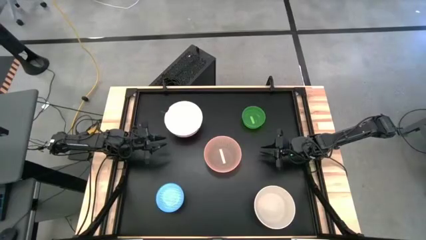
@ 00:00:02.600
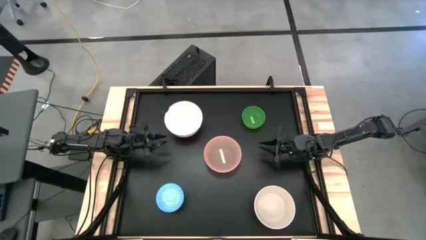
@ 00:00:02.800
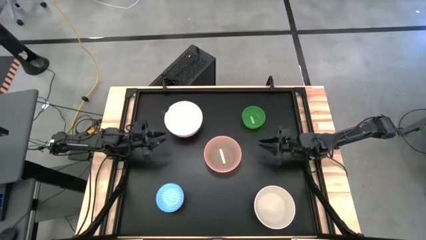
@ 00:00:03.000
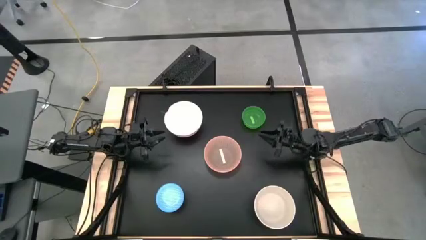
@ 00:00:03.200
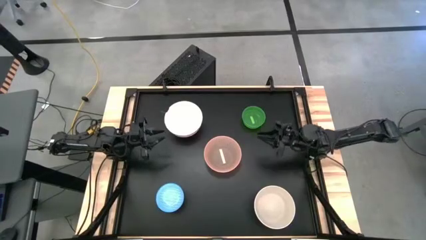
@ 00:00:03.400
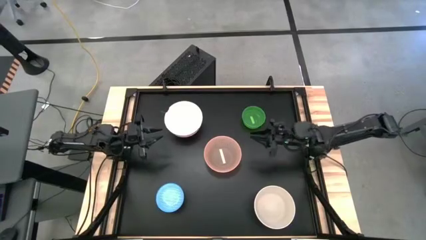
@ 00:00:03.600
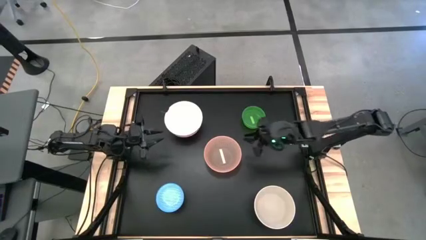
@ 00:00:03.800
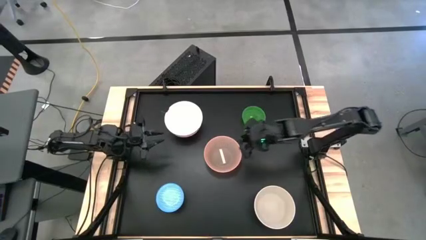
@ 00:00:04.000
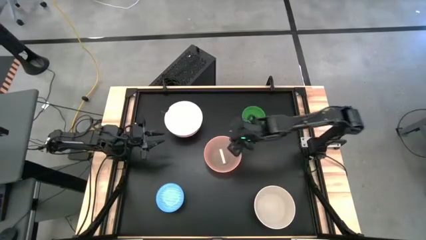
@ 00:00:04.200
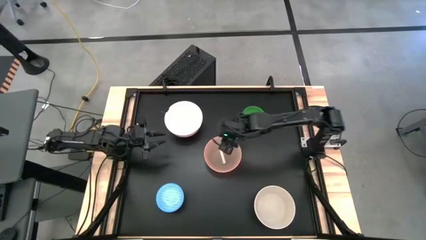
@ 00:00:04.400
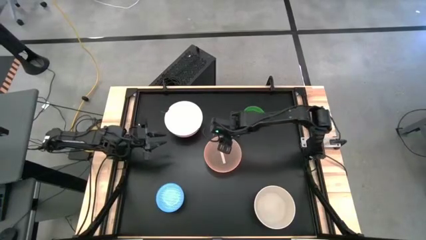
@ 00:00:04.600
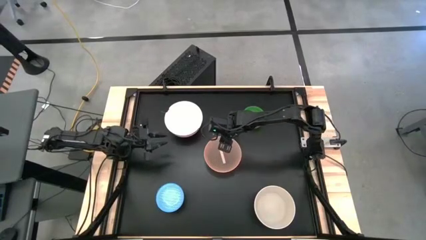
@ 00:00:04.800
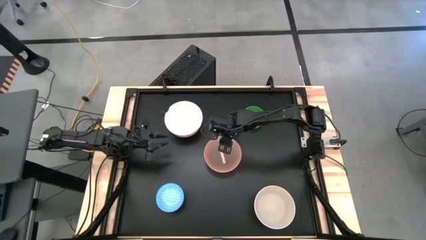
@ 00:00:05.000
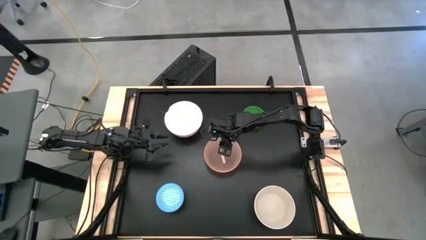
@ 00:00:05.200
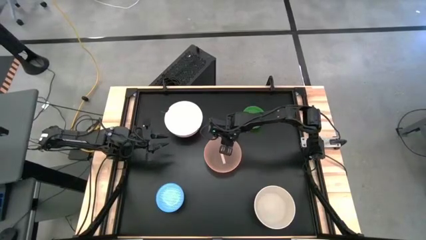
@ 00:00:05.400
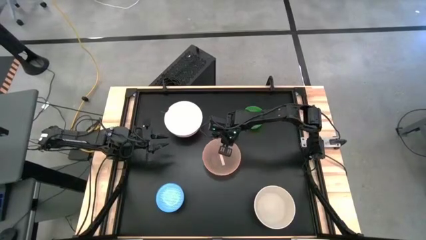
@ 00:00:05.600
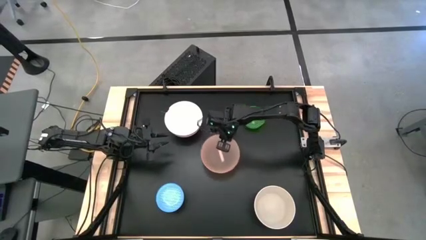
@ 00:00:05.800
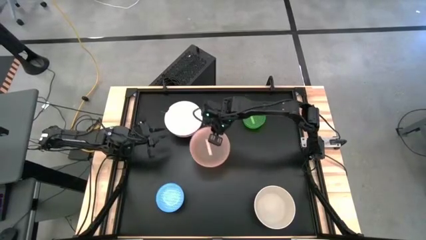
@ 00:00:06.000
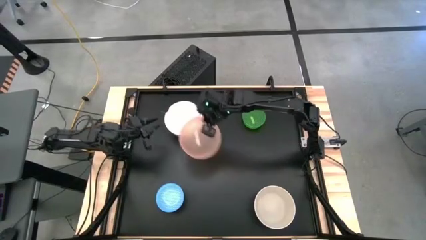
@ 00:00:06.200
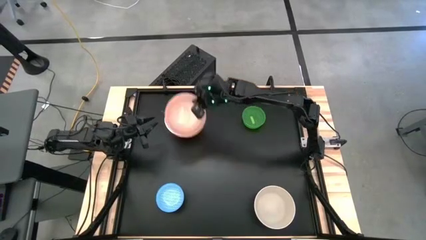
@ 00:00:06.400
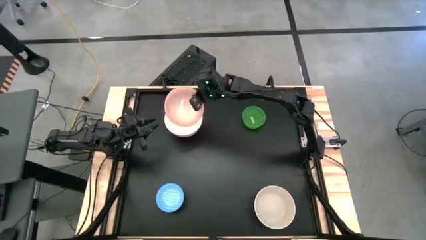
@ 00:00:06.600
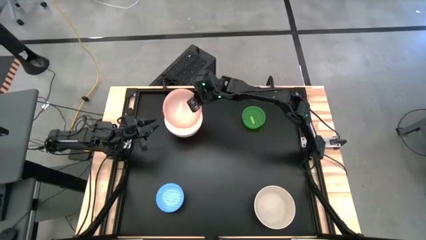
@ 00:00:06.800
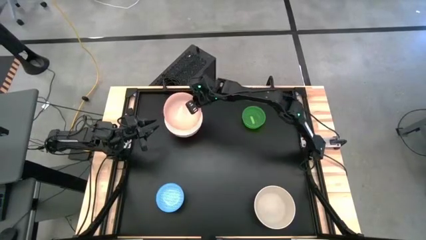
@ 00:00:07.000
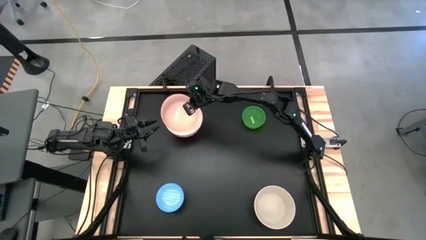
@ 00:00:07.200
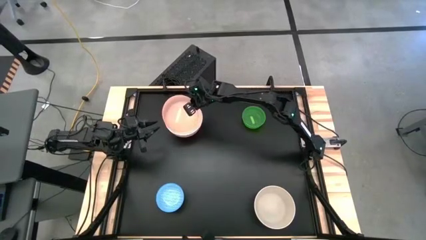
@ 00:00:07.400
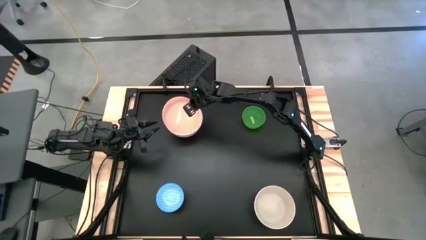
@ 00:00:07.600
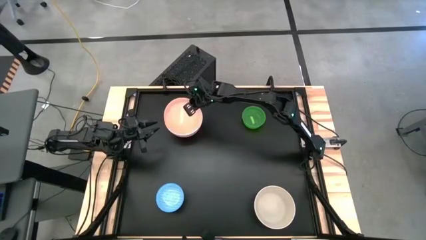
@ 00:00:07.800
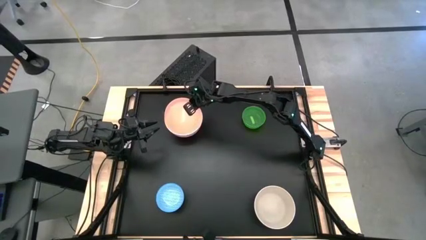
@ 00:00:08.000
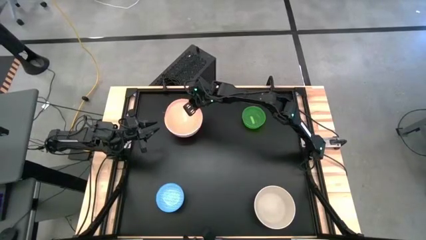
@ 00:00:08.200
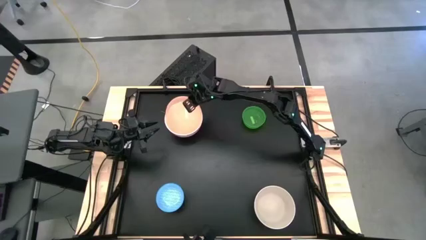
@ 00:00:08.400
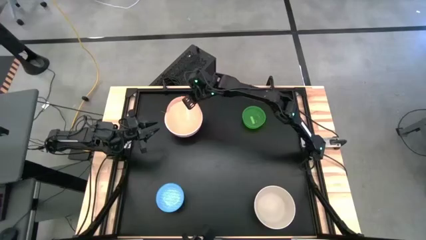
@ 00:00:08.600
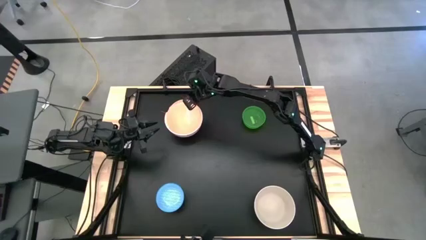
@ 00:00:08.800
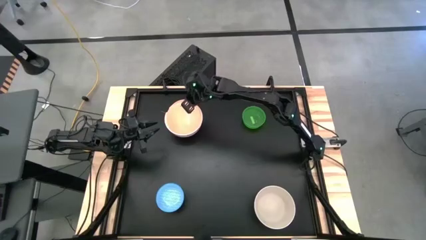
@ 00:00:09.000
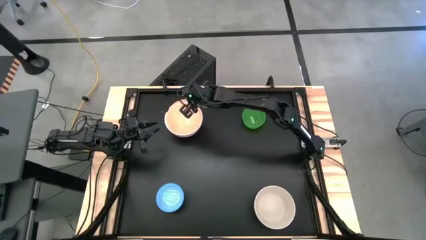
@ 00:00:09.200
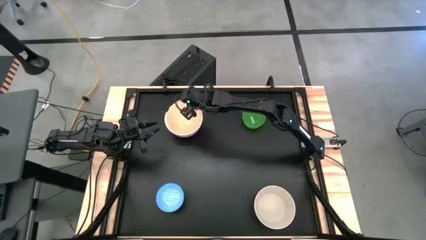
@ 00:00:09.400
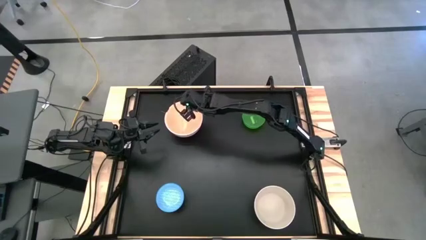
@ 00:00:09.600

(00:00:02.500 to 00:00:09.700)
Stack the light orange bowl on top of white bowl

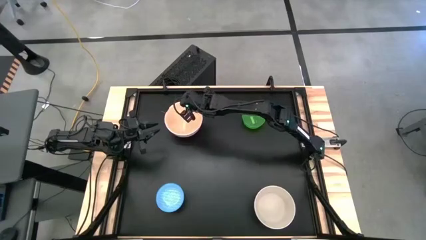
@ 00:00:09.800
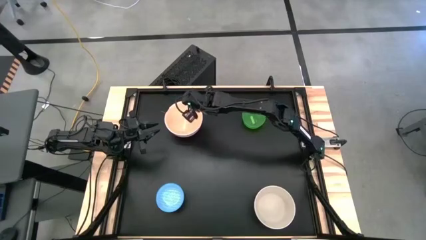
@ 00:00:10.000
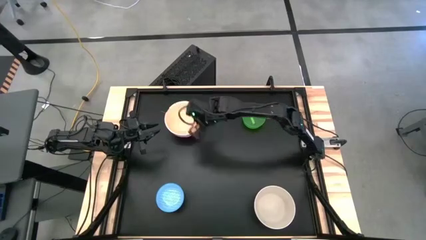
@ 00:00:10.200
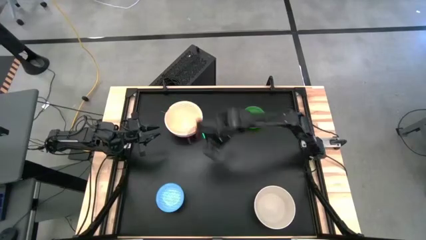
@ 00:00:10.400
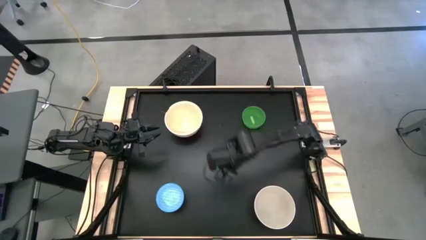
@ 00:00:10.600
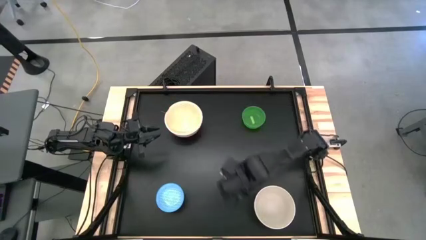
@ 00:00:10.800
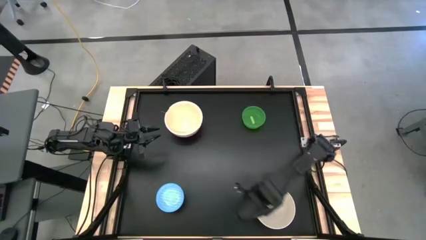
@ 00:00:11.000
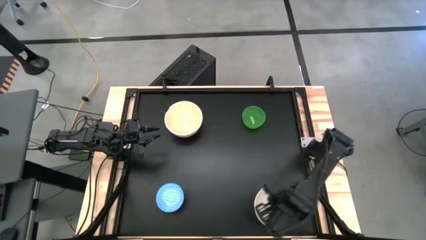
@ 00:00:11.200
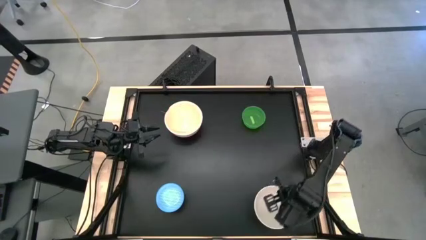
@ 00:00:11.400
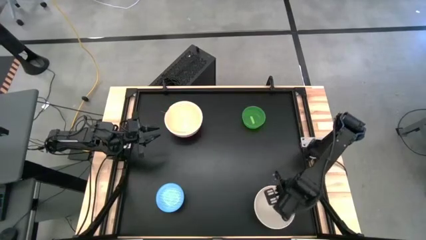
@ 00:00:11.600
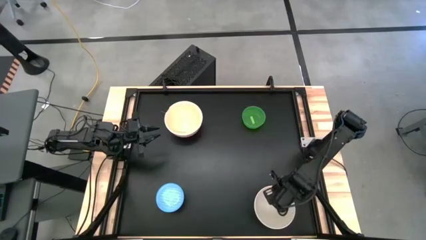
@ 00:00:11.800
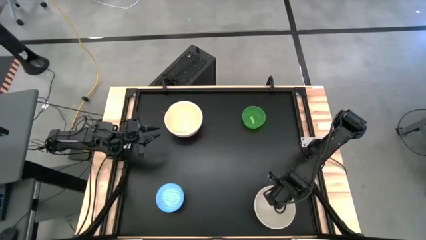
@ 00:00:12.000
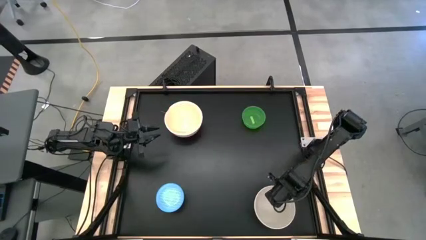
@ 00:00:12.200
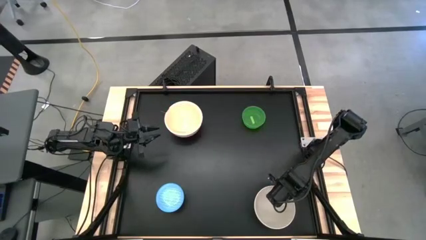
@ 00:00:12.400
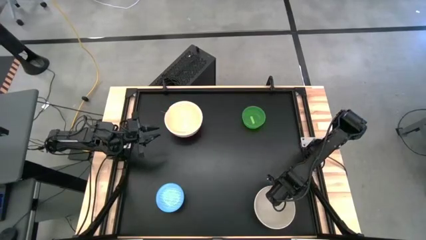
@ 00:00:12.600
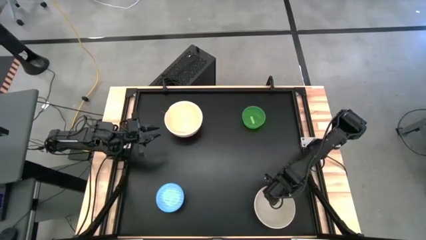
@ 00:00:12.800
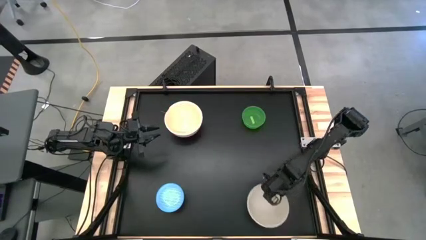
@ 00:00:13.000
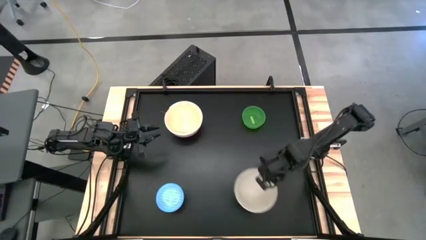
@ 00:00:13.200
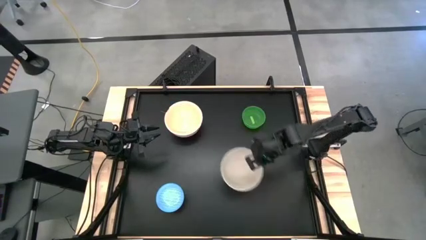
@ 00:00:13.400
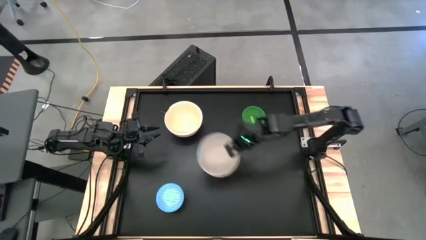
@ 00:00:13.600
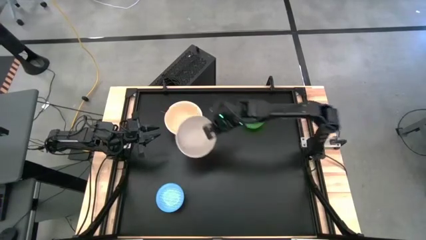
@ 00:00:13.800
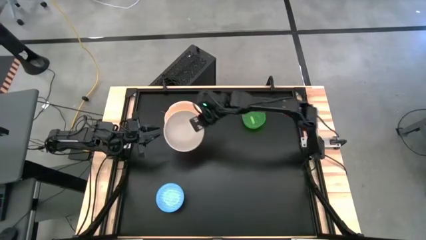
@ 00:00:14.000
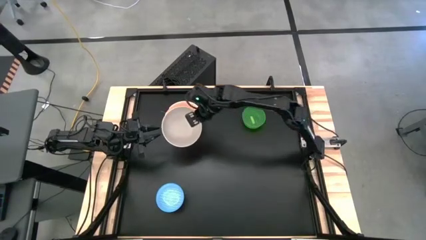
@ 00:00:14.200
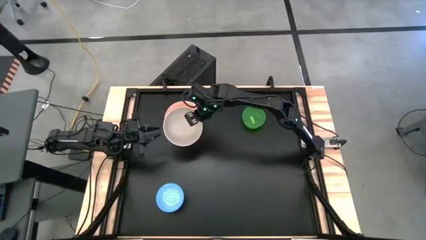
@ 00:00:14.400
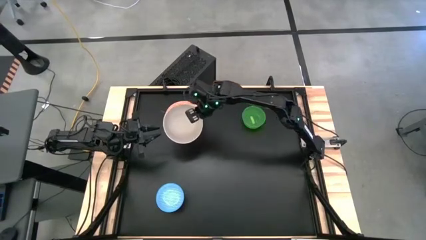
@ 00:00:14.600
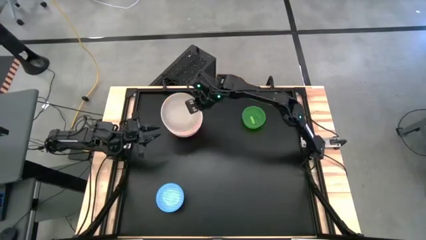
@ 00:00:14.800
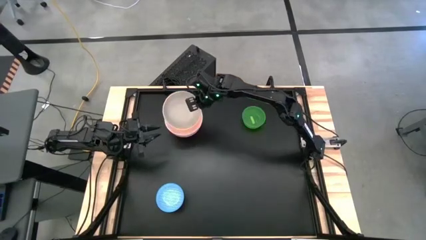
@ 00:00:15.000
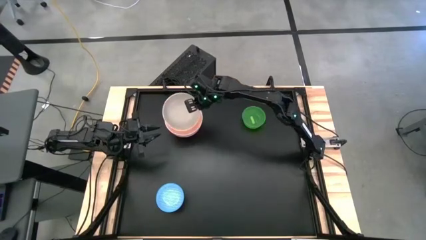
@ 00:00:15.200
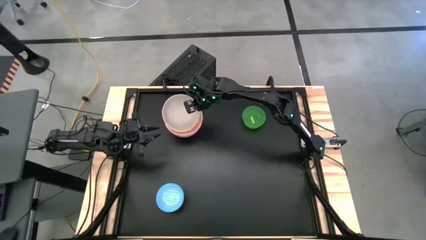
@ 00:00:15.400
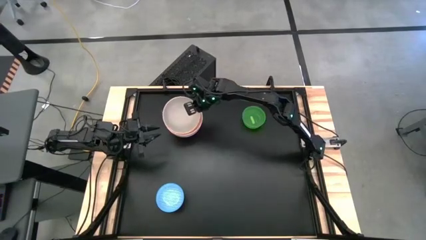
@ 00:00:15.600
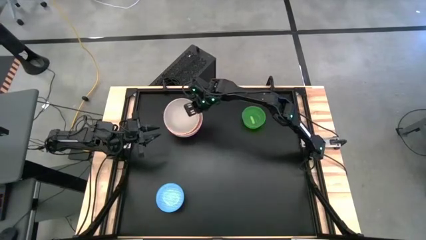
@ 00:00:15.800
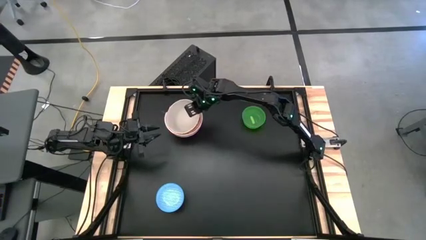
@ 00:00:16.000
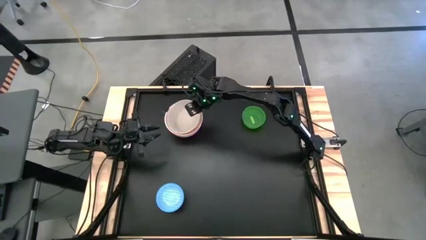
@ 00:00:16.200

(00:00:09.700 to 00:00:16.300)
Stack the gray bowl on top of the light orange bowl
